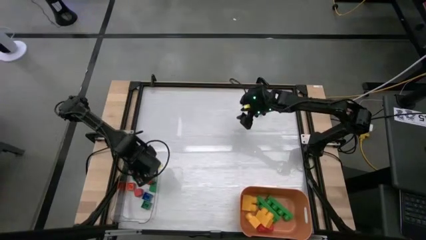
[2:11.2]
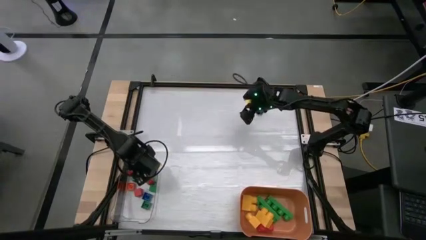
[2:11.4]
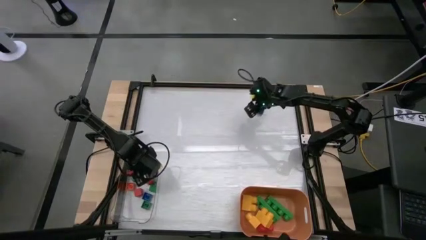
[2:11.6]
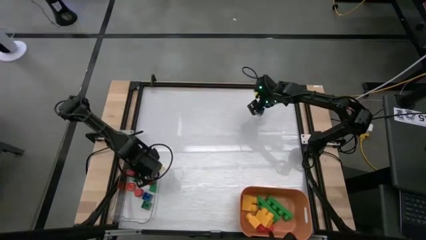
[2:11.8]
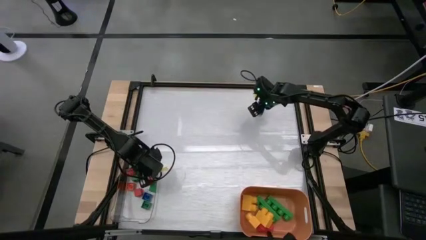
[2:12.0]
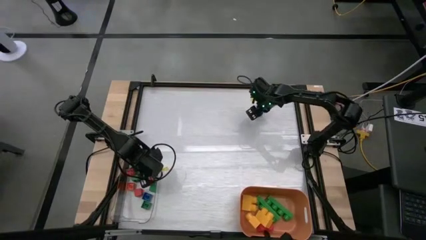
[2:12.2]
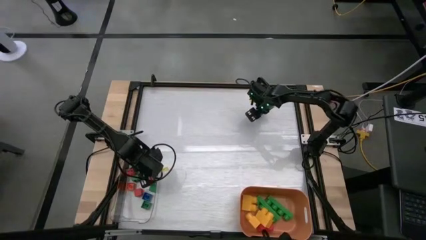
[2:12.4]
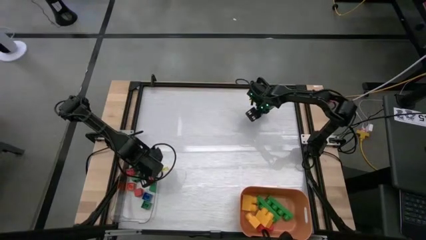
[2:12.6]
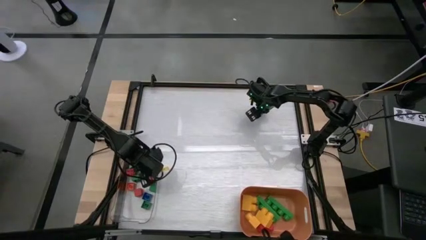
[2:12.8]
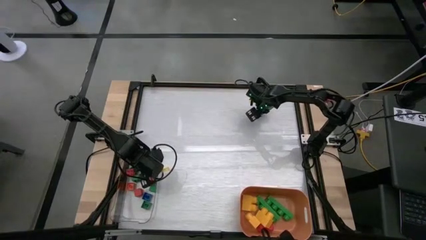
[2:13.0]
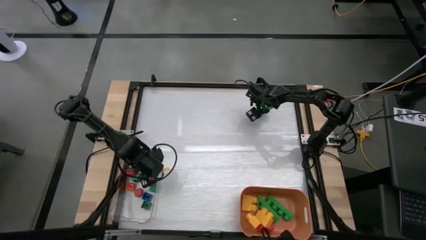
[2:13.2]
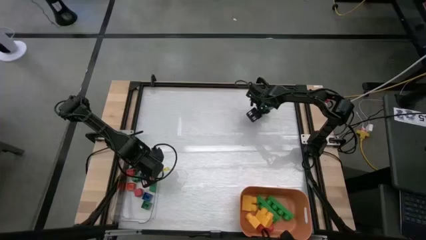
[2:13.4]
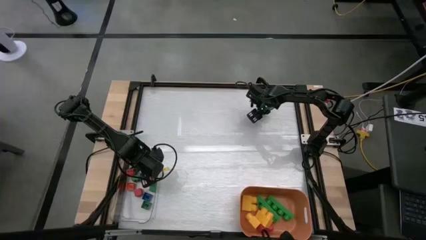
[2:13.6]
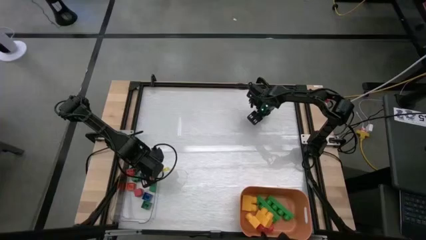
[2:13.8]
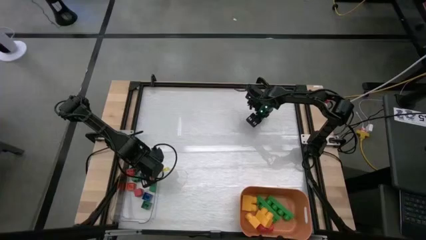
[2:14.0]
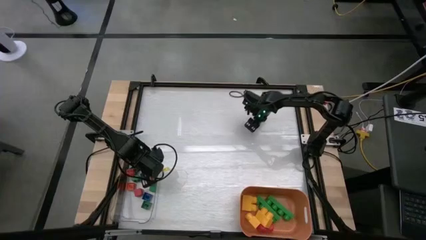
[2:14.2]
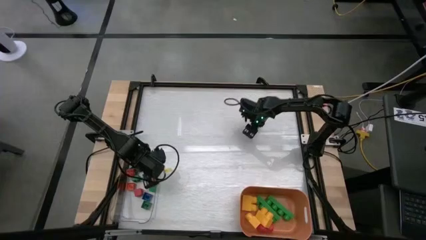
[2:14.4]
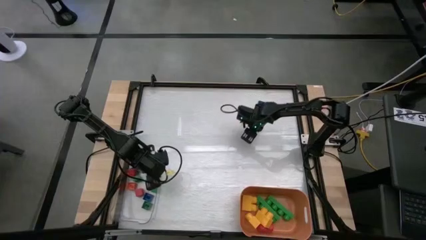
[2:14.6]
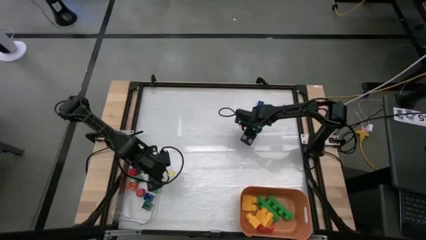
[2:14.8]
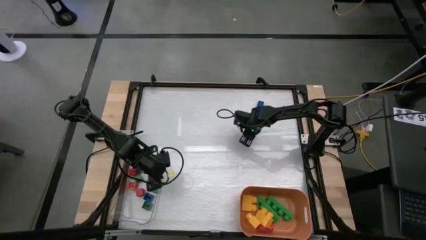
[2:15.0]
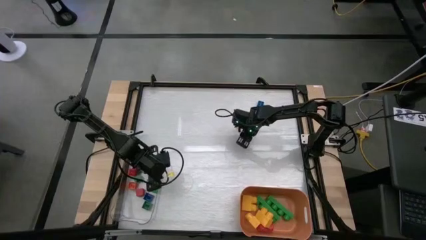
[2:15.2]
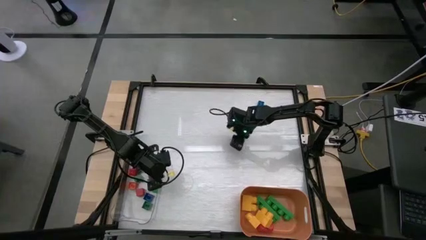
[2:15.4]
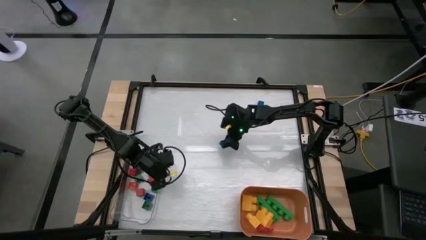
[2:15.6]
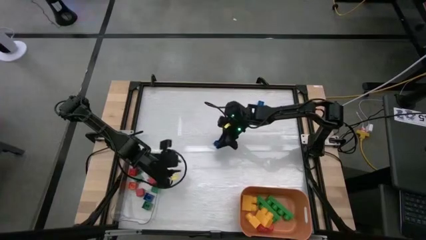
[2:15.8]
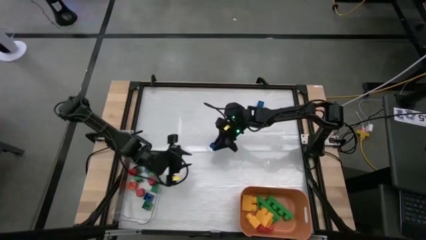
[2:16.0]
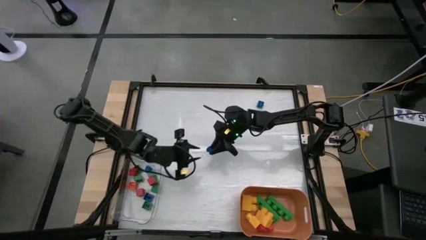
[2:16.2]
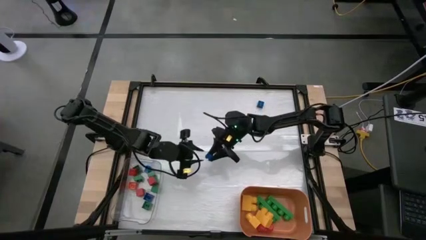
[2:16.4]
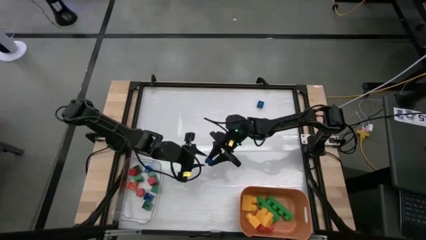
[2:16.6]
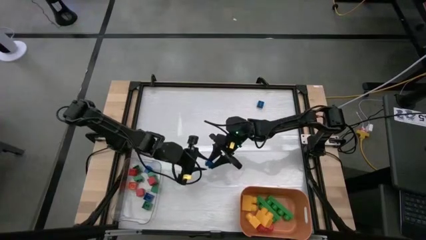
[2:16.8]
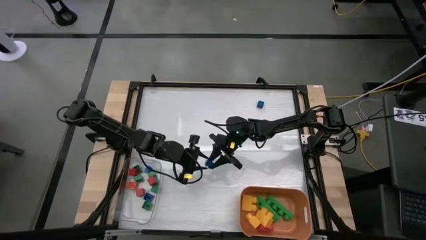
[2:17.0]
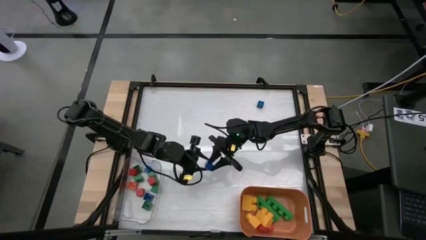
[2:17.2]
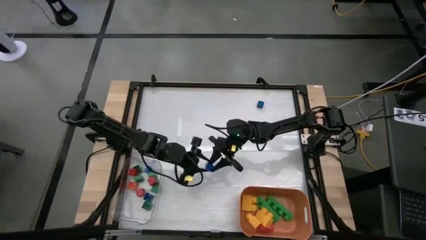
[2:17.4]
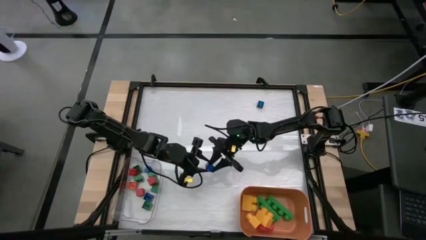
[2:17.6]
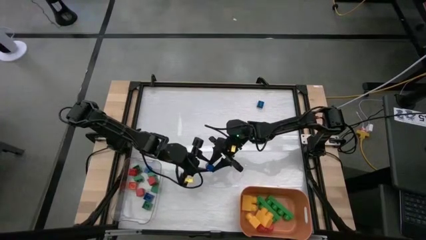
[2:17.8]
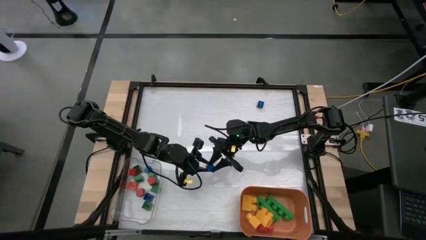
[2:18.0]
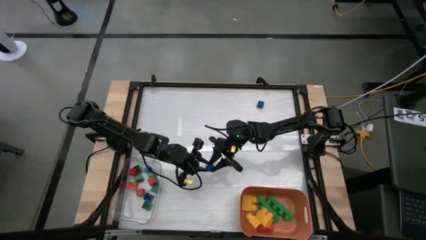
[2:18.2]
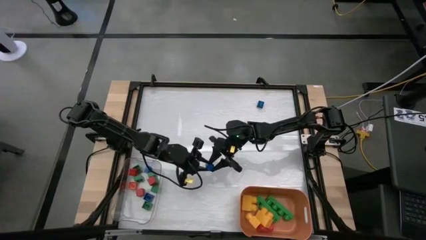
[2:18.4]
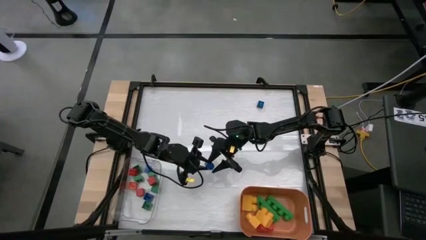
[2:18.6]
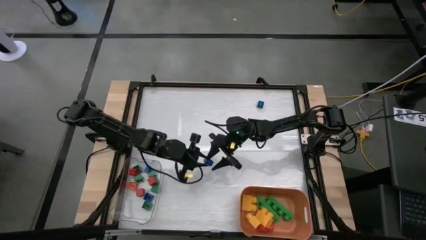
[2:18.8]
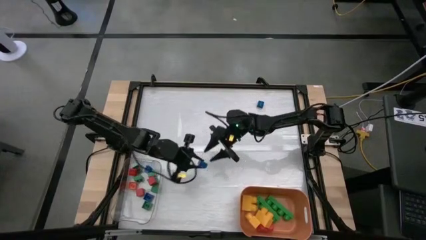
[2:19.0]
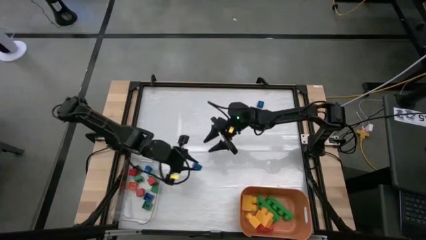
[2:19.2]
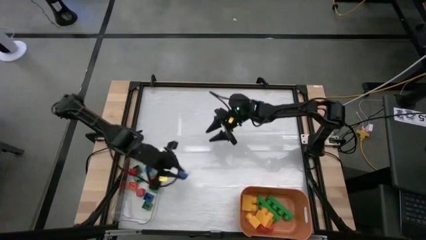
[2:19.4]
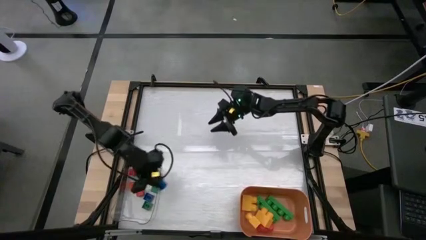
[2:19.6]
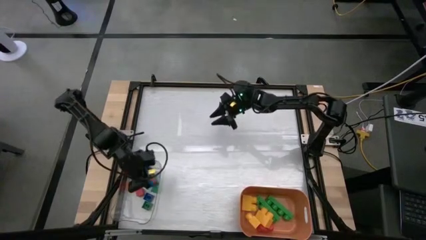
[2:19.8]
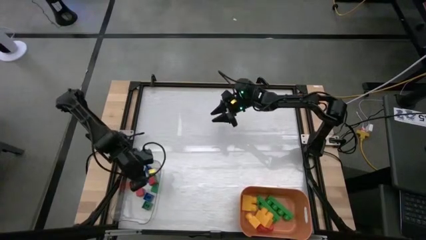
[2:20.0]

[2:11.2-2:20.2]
Task: Sort blocks by size
Put the small blue game piece into the transparent bin

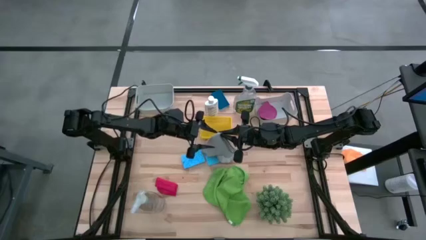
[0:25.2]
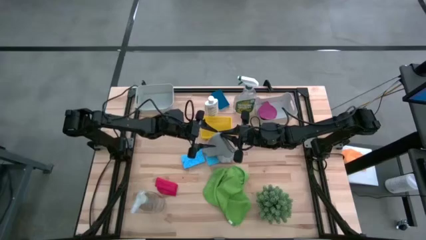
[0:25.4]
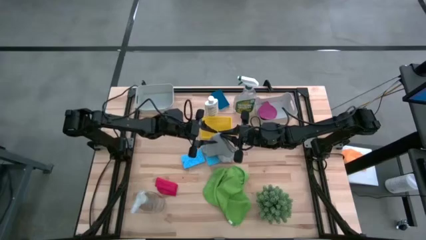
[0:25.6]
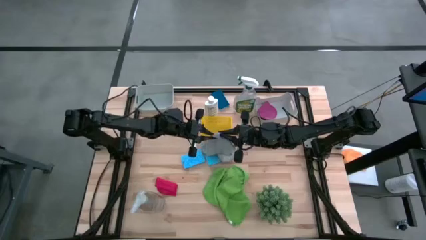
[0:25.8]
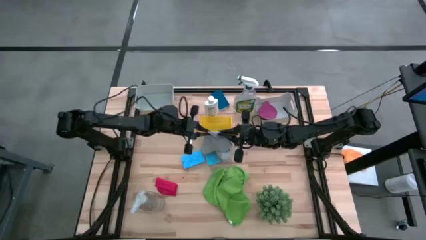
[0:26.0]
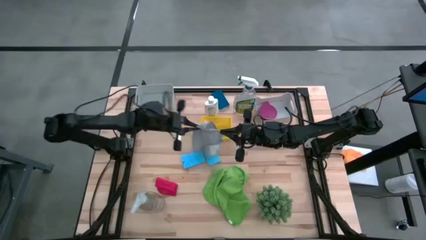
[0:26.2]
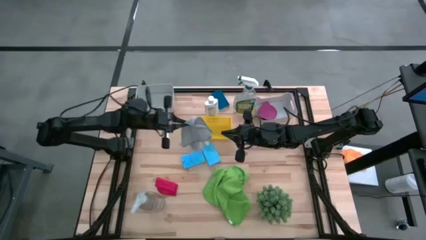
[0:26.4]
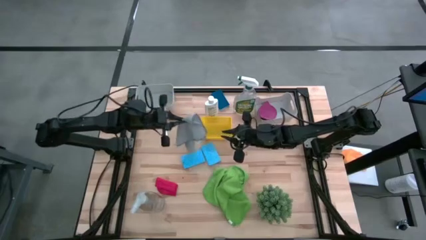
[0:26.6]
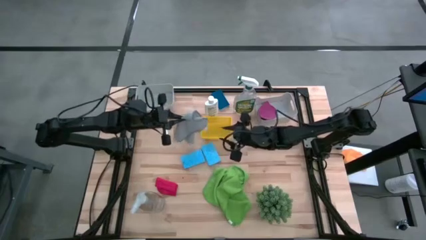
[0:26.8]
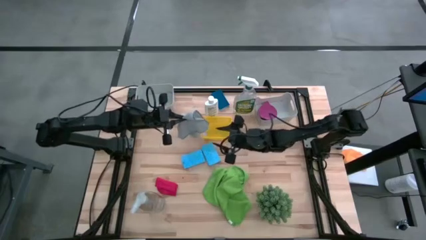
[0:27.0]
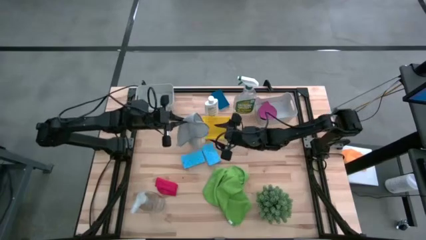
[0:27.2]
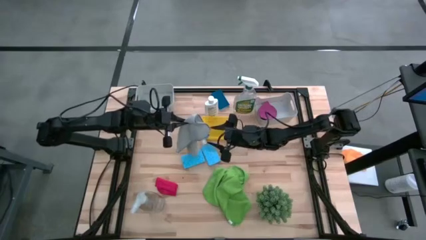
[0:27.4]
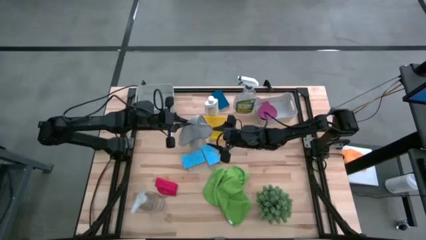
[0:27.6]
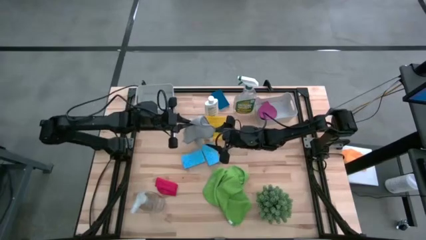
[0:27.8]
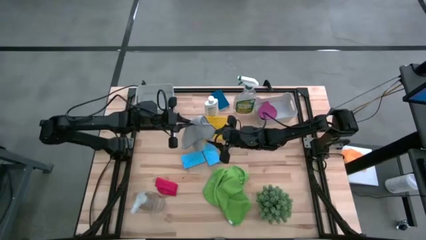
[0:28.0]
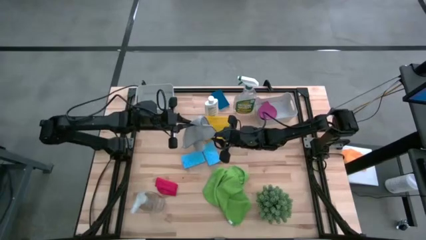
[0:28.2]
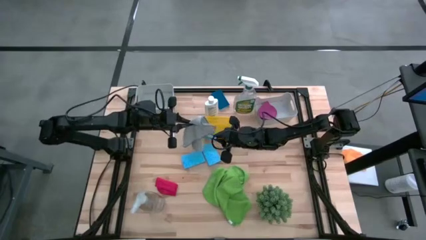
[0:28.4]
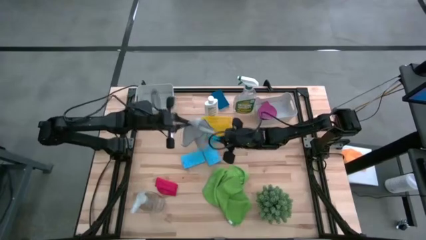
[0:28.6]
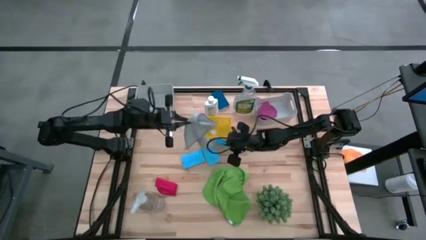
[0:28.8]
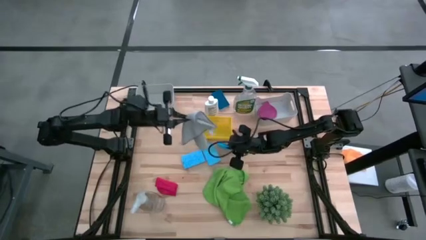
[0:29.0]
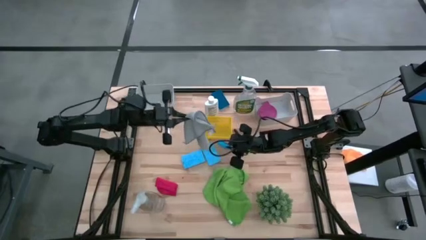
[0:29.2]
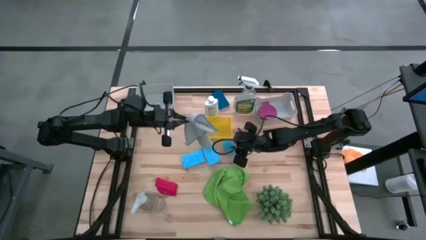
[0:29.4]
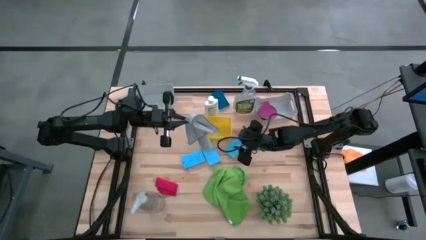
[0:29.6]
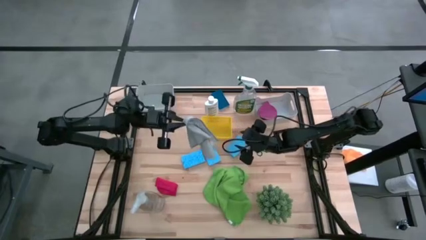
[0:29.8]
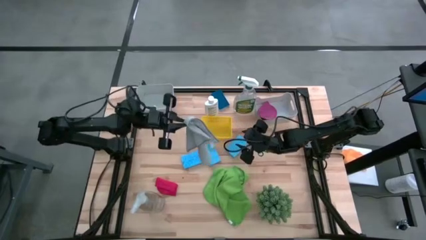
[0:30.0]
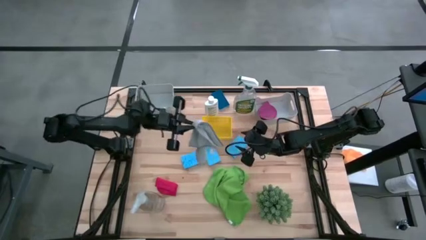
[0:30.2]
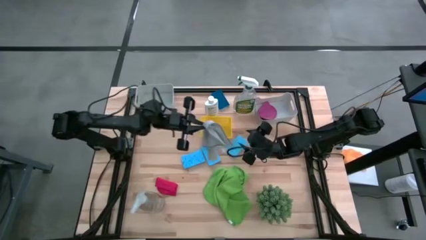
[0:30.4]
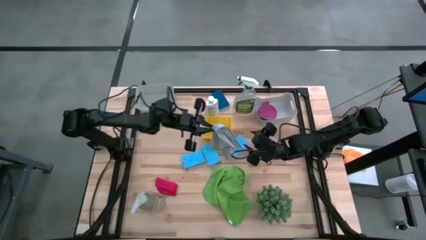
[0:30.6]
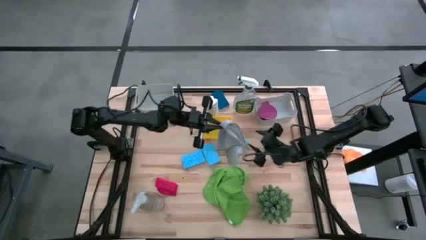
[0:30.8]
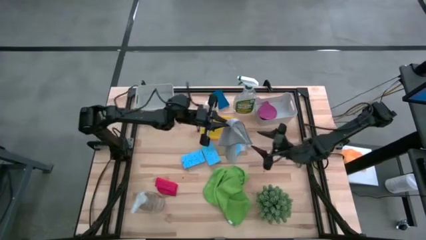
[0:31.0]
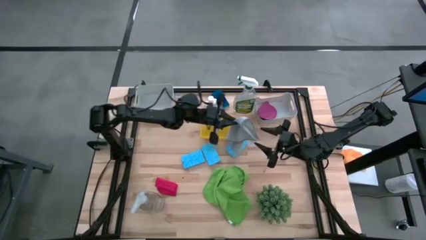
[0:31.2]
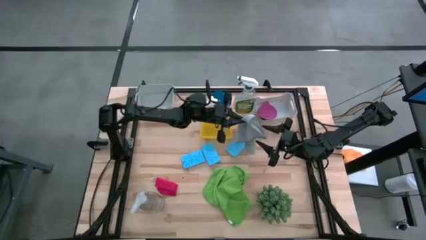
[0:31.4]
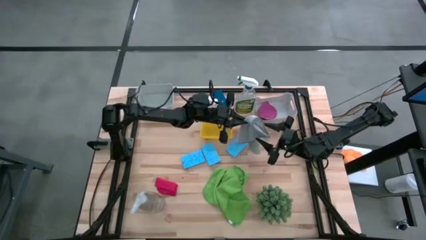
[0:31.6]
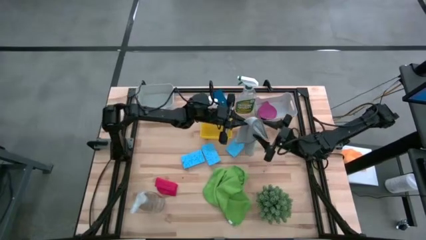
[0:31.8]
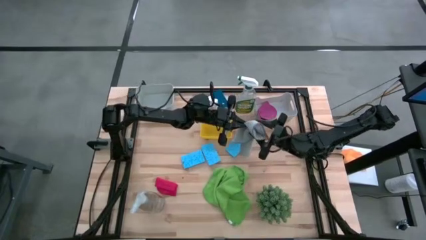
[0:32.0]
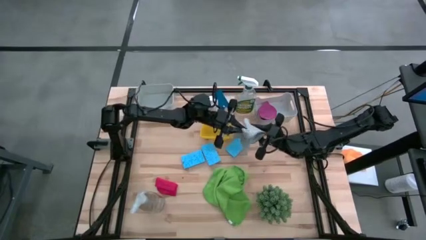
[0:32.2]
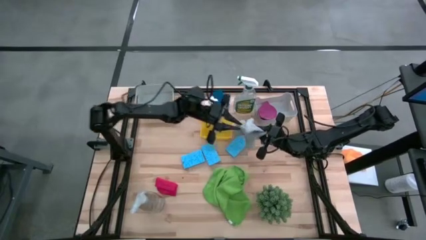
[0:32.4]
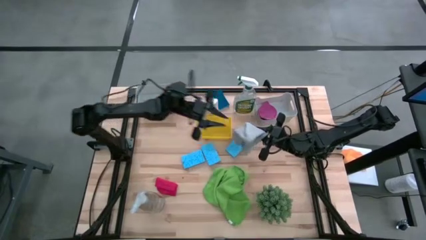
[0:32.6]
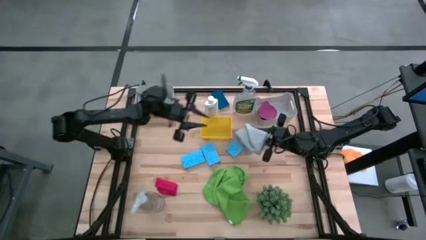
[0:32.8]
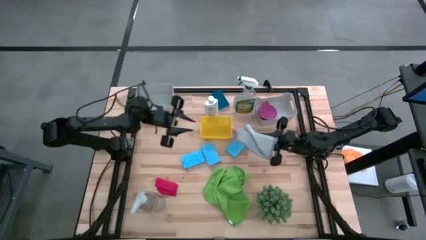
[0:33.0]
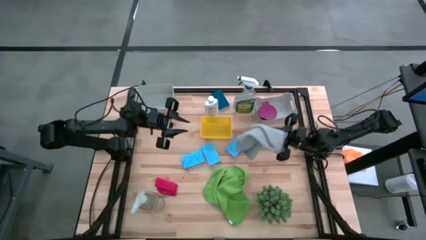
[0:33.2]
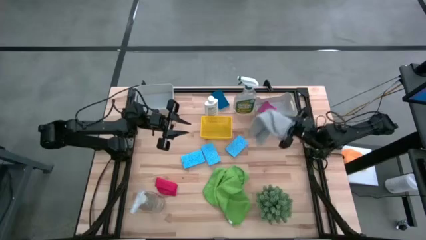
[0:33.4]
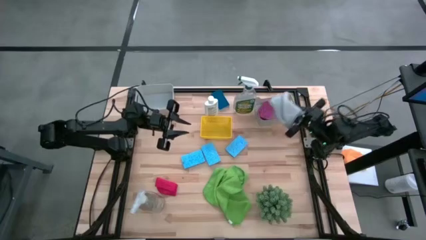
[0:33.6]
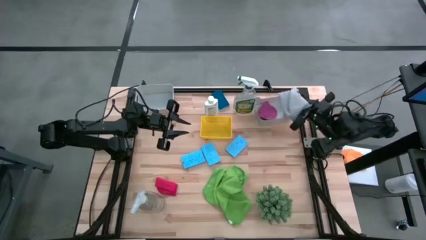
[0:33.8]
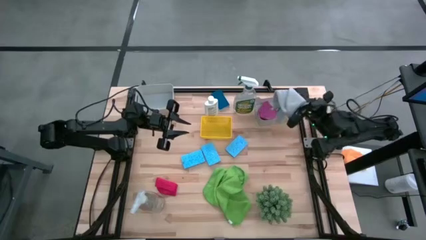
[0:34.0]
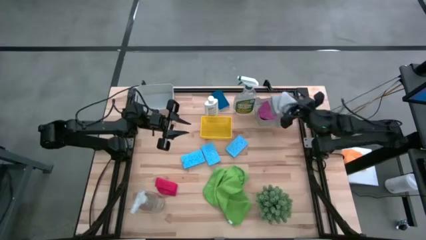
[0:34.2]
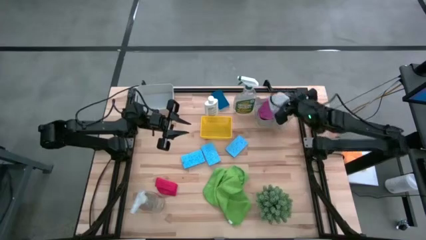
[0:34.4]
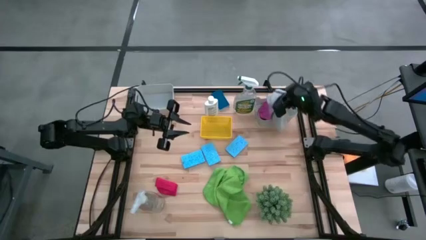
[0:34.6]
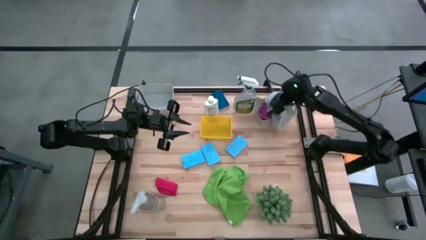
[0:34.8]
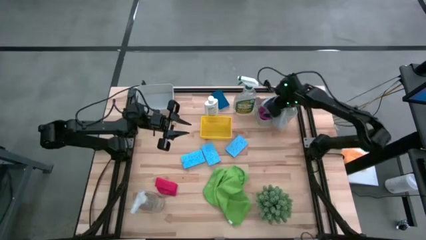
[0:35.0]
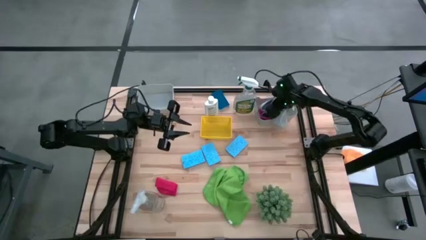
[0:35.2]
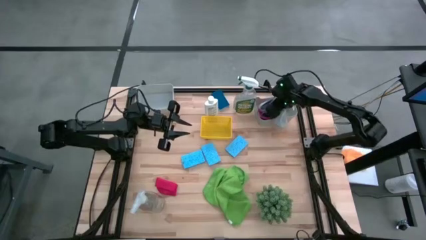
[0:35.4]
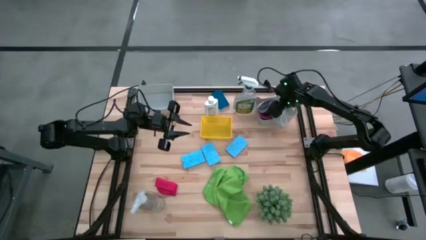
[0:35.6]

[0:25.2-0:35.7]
Task: Pick & Place Kitchen Items
Put the gray microfiber towel into the right gray bin
